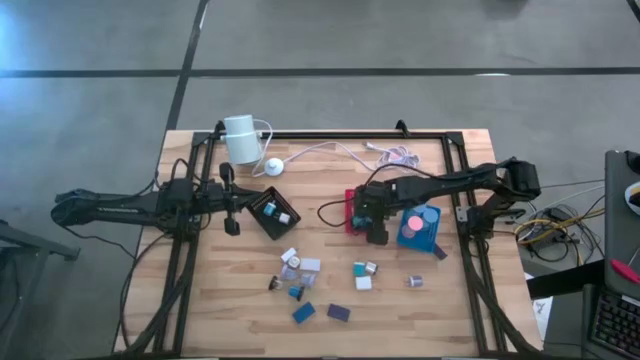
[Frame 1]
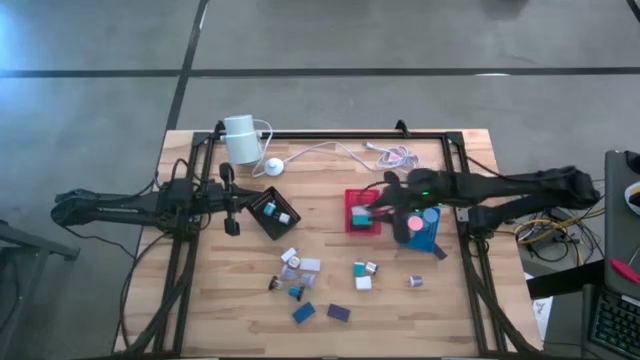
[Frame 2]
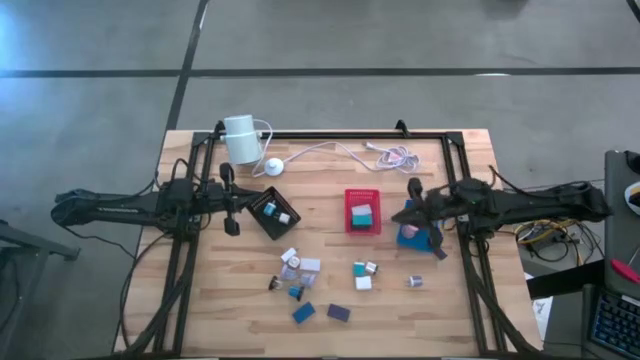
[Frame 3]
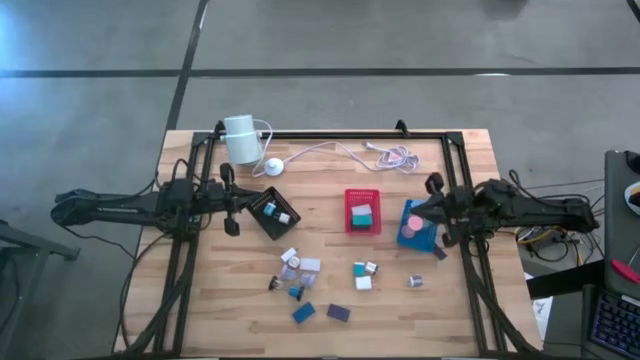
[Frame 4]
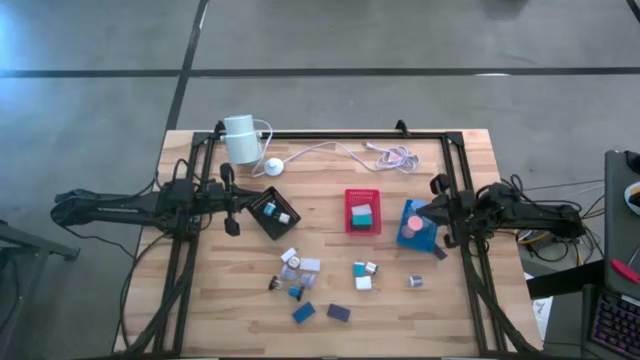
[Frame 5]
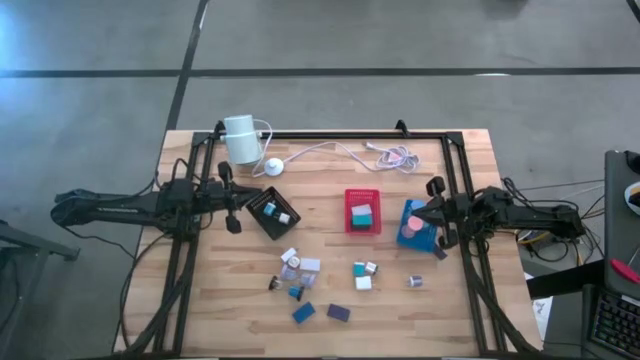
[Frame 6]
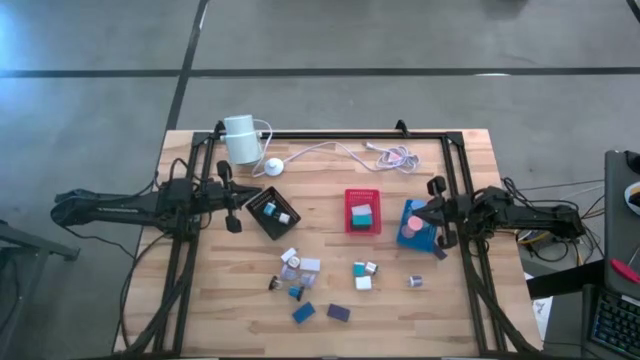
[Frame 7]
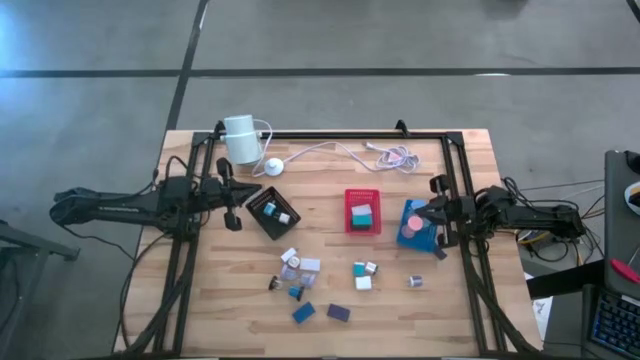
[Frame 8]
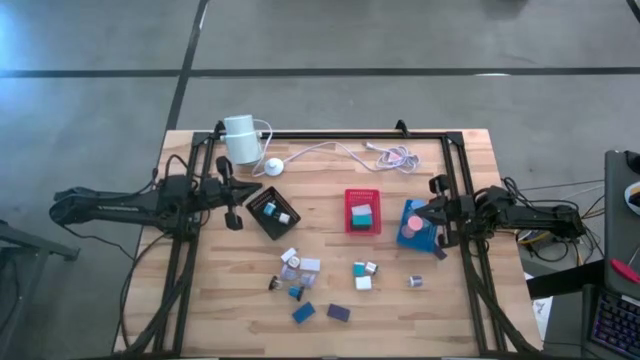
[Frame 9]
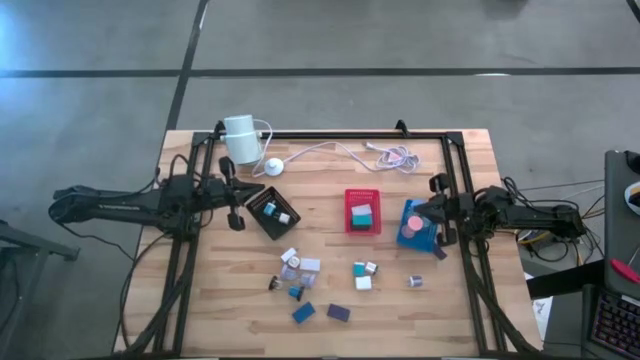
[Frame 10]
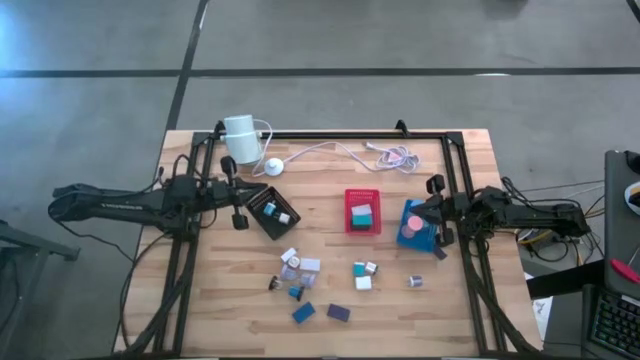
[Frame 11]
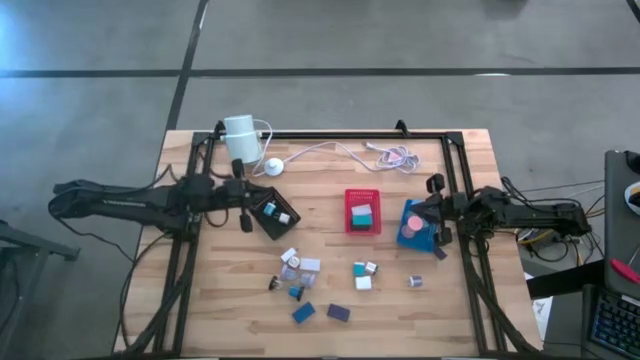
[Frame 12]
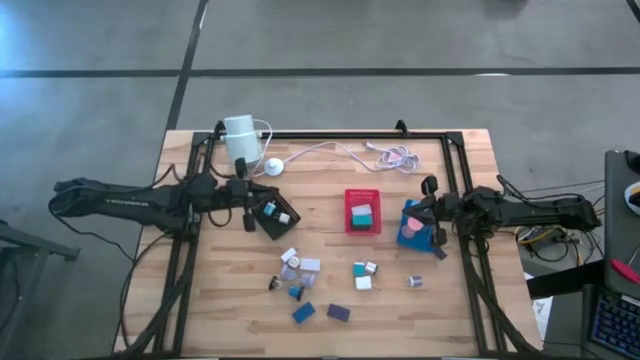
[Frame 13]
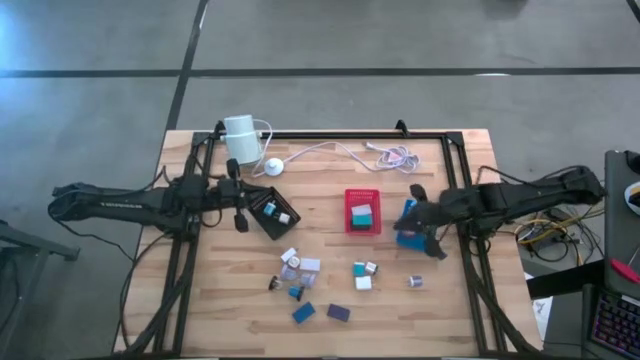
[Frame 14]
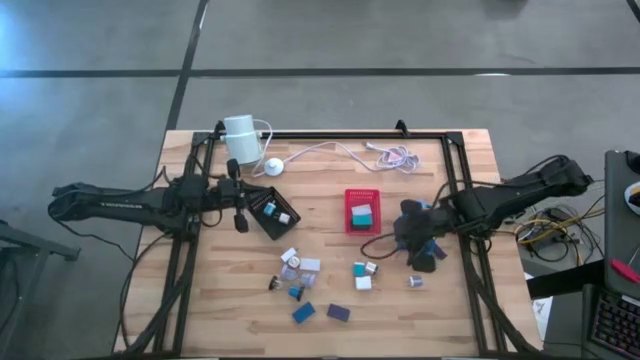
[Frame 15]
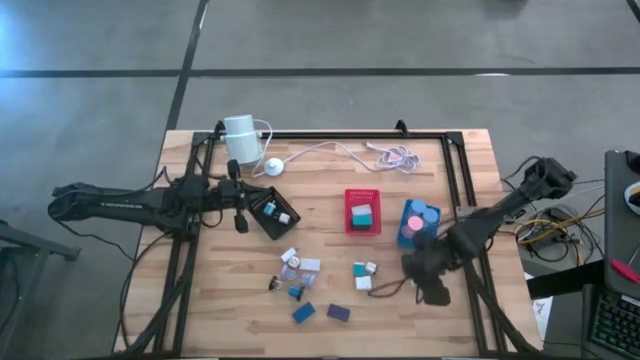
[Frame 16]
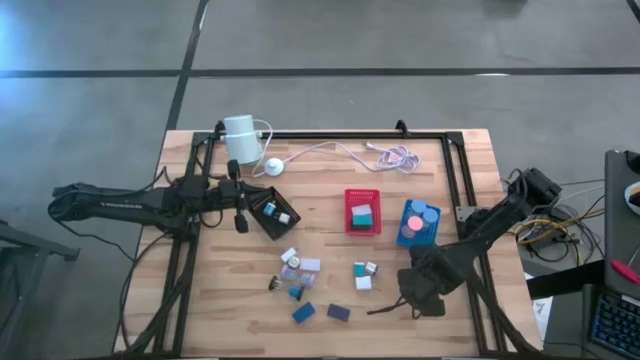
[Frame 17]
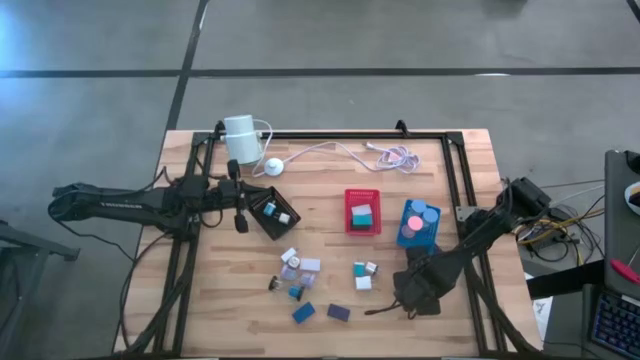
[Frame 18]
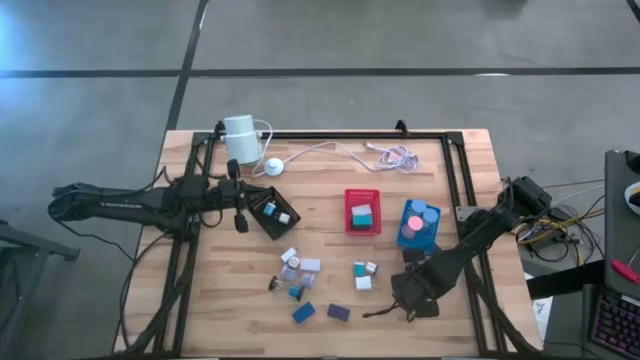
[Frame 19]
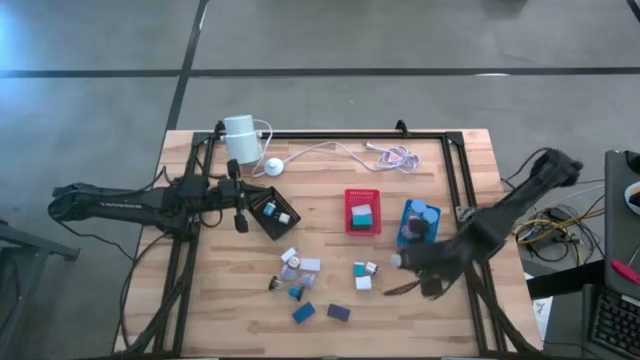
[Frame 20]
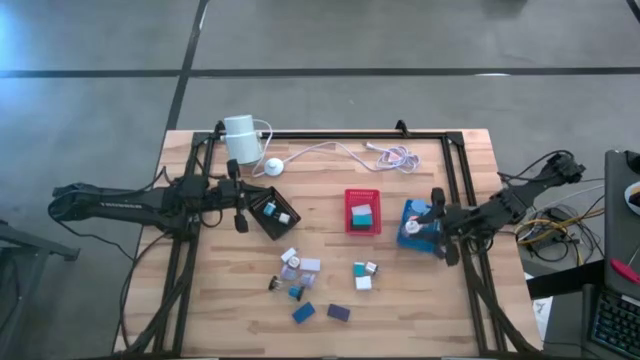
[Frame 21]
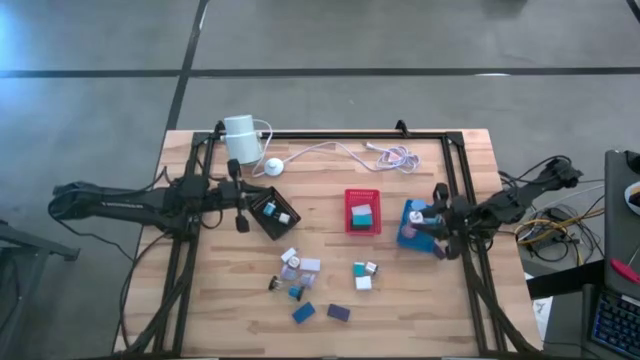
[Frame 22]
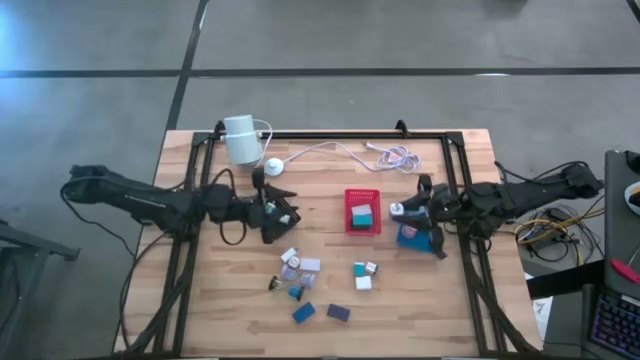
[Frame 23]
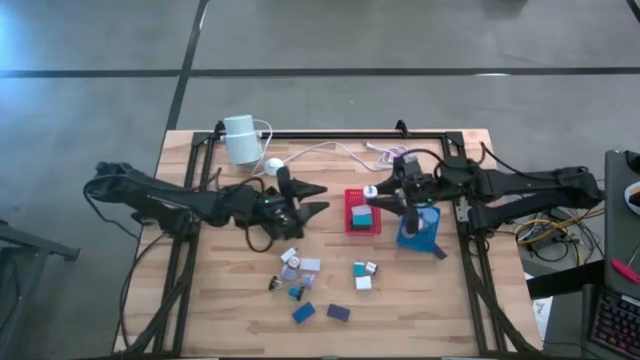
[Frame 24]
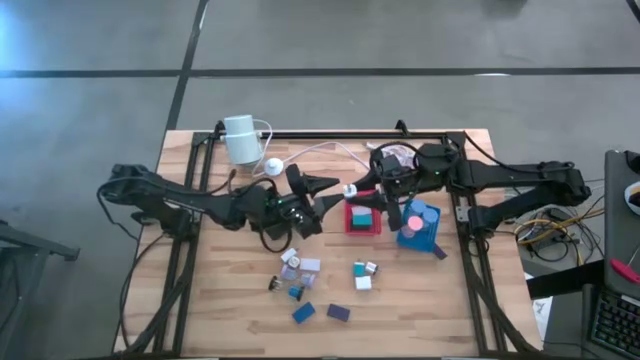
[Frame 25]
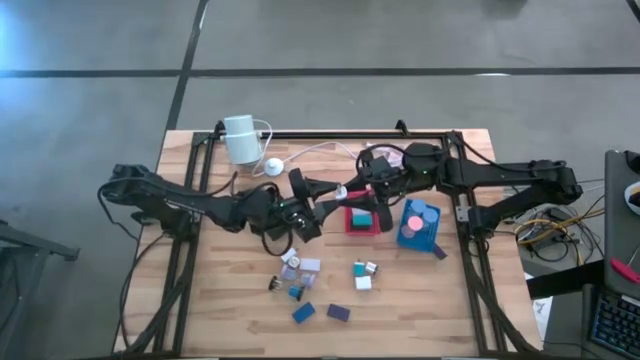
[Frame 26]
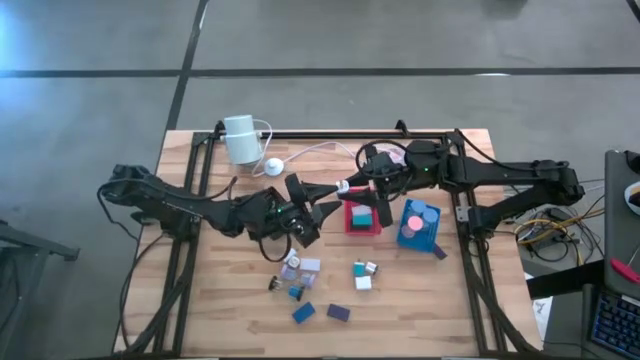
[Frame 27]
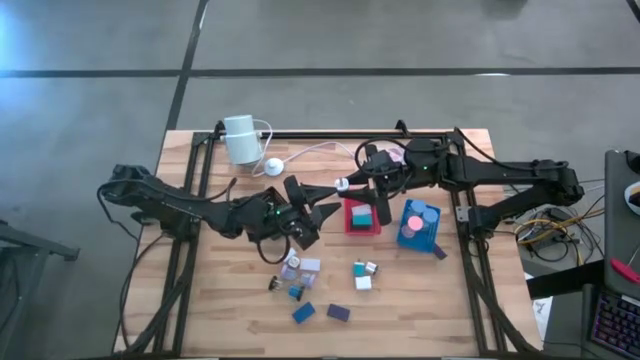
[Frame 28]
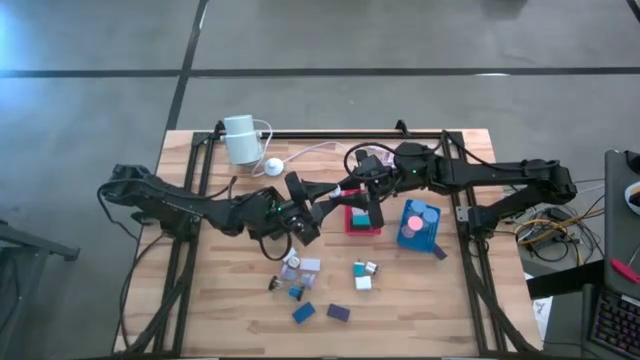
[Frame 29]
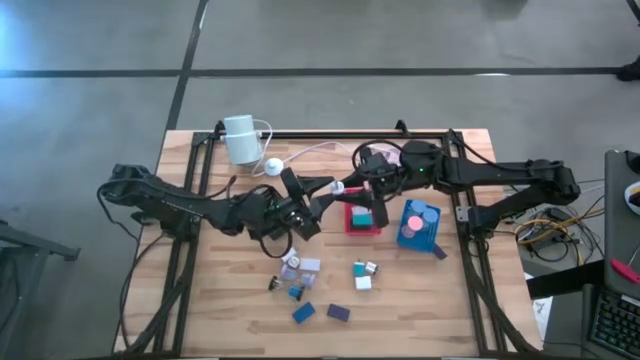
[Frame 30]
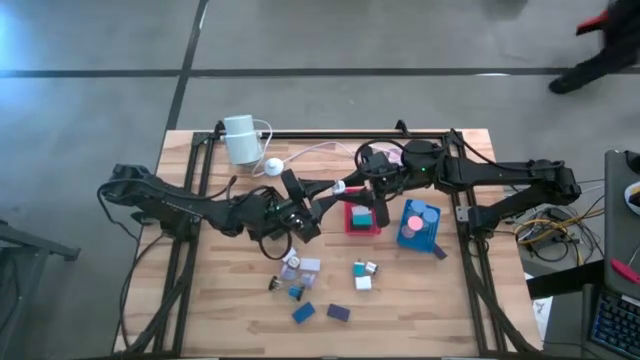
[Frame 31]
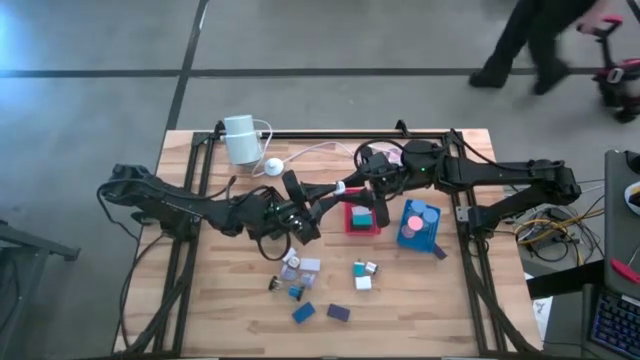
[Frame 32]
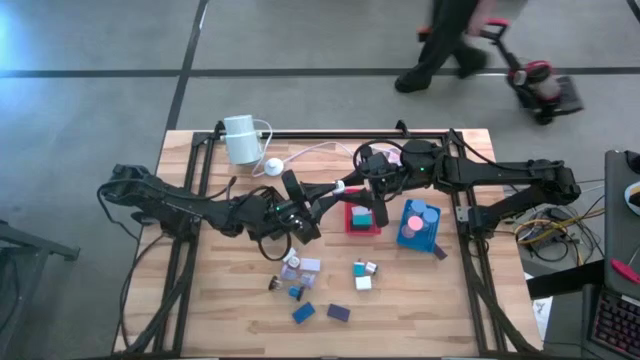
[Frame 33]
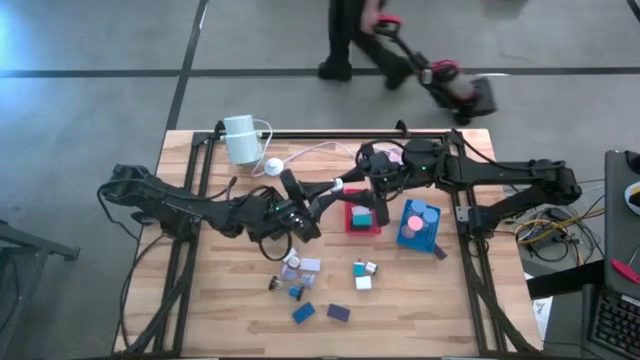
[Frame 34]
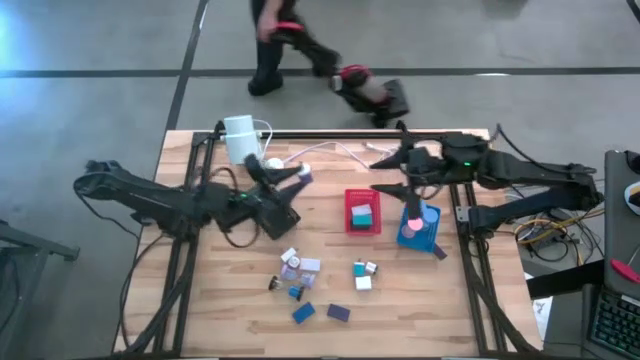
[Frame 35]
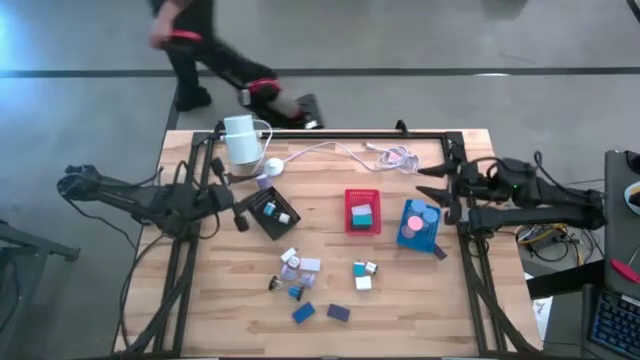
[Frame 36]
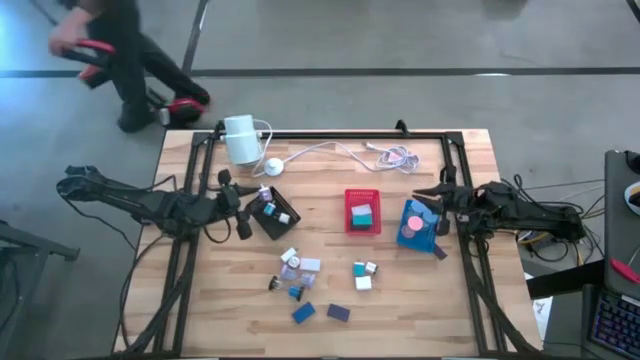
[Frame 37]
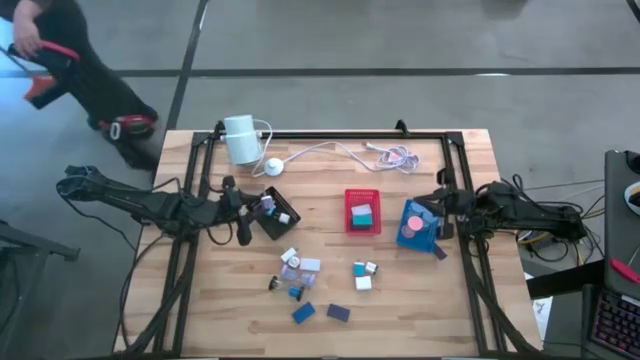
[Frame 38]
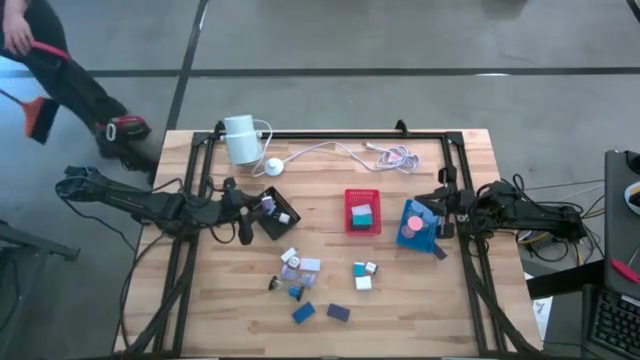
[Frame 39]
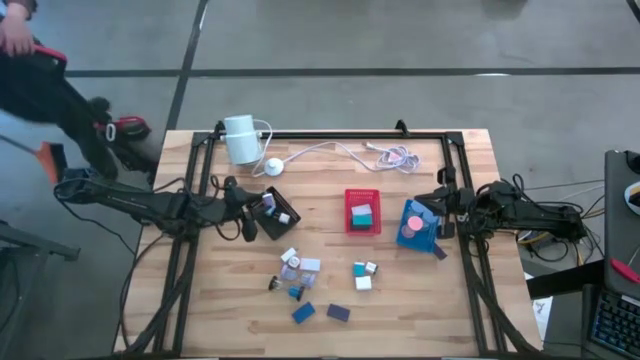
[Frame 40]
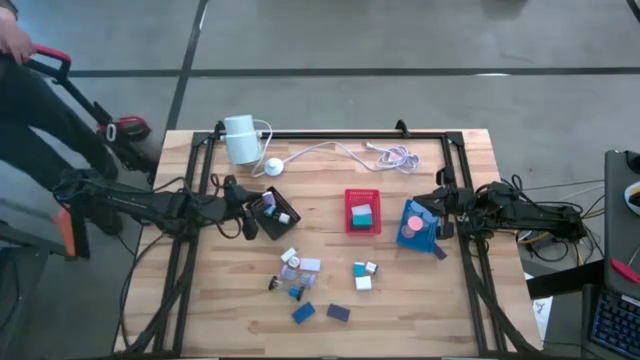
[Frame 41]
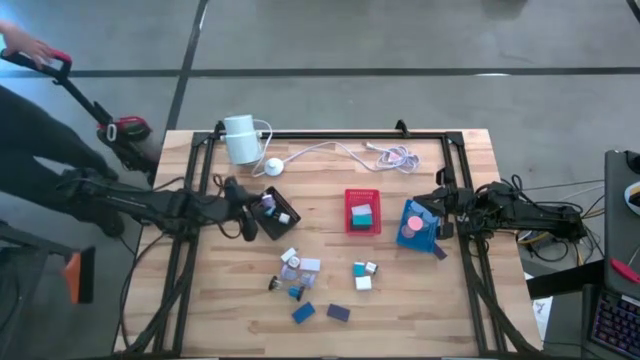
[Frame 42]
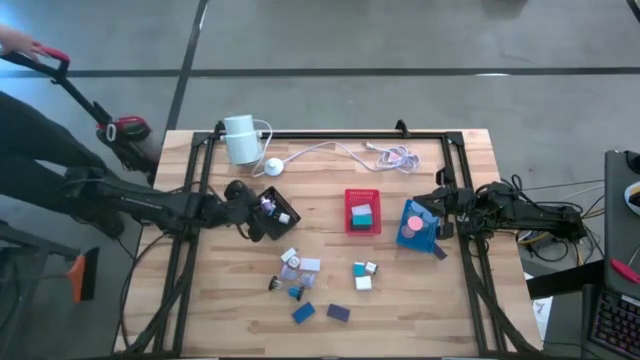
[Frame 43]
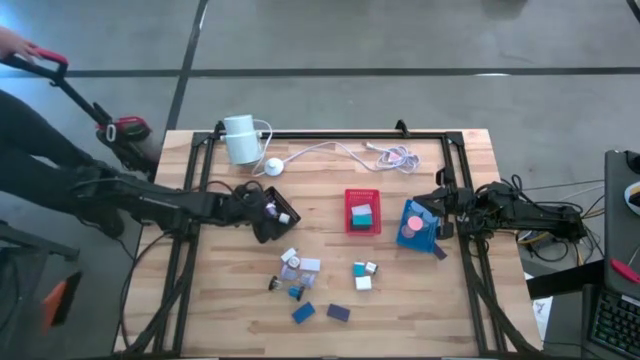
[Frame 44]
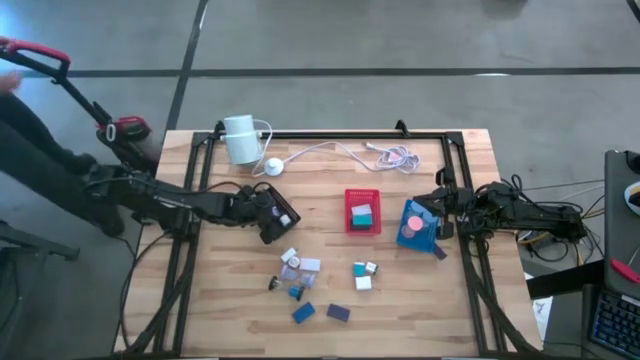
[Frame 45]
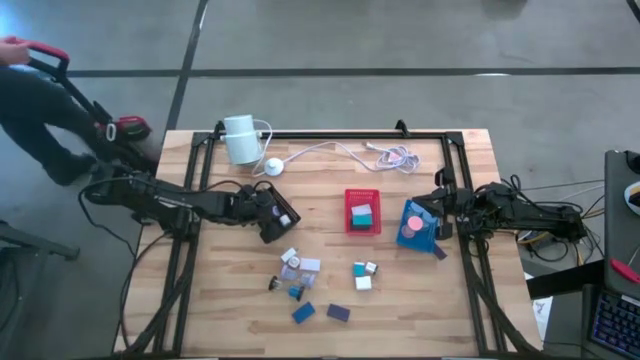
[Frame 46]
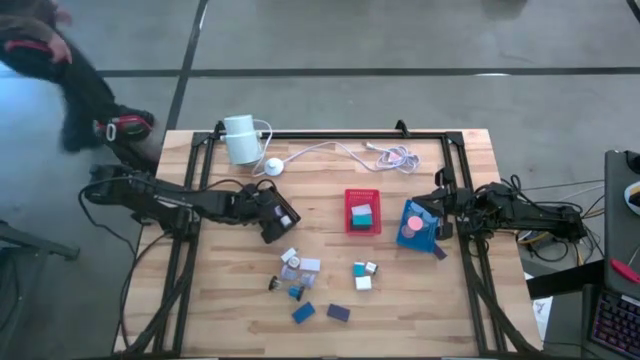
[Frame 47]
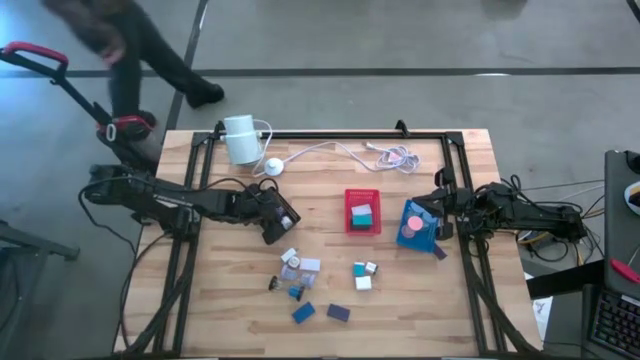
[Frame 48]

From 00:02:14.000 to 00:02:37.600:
Task: Pick & Place Office items
Put the purple charger adaptor into the black bin
